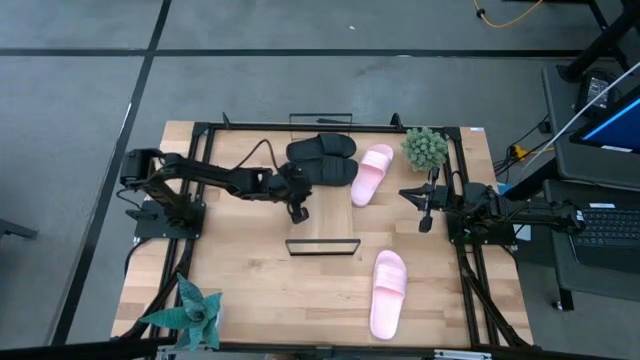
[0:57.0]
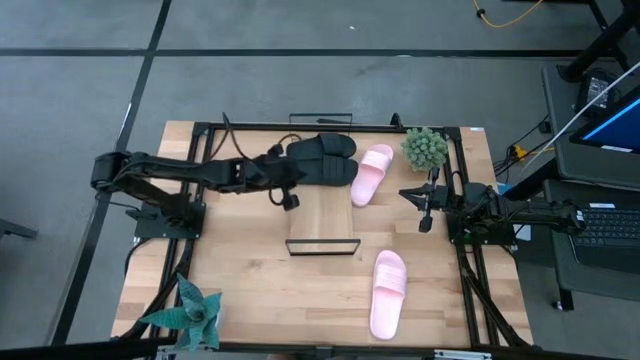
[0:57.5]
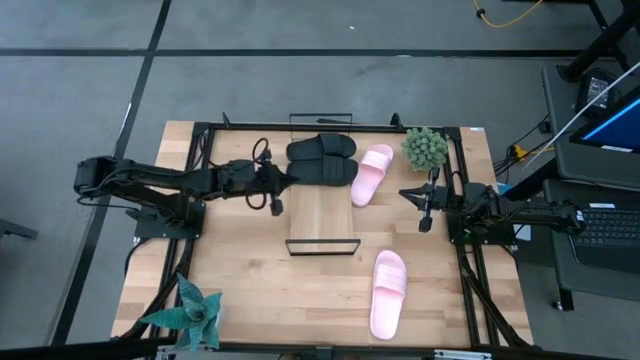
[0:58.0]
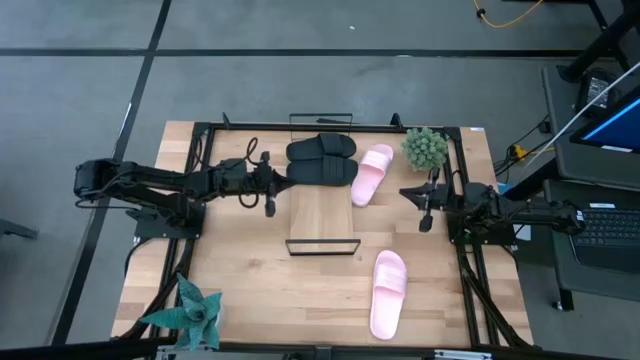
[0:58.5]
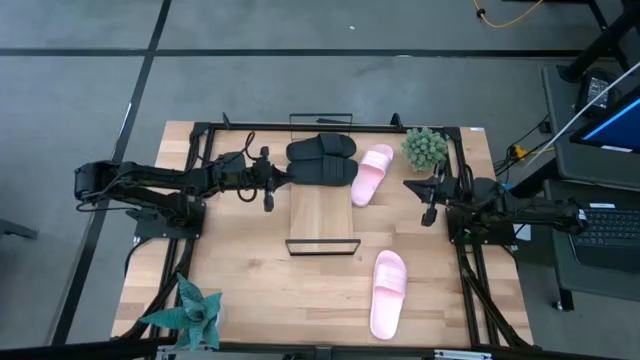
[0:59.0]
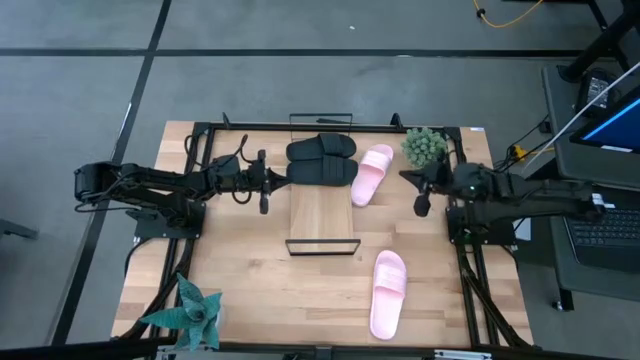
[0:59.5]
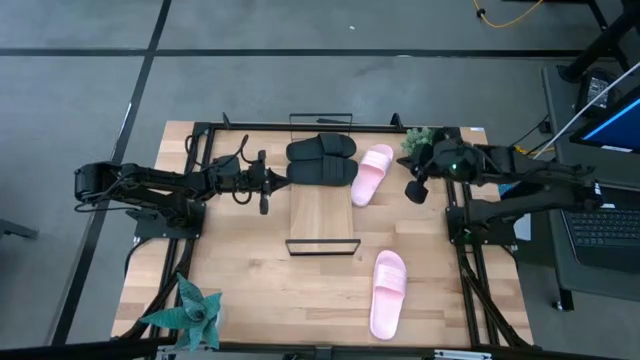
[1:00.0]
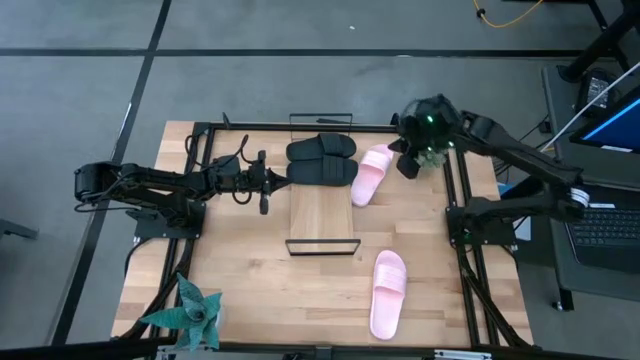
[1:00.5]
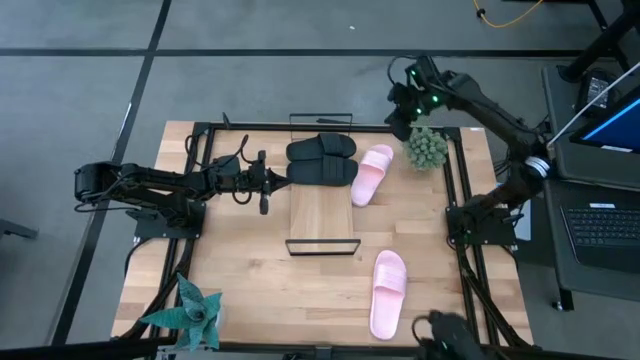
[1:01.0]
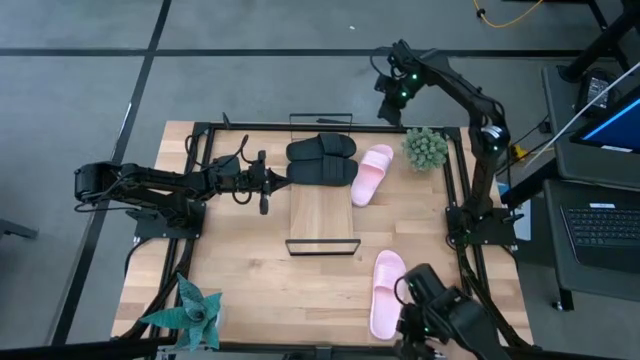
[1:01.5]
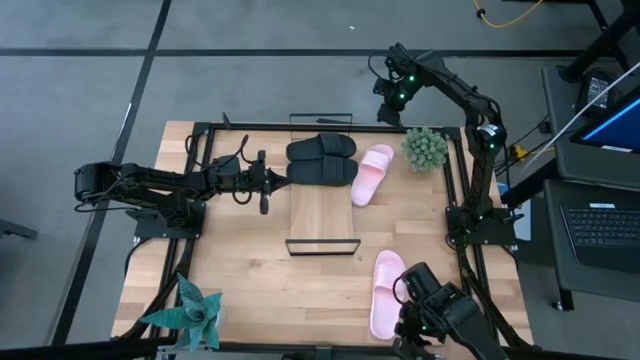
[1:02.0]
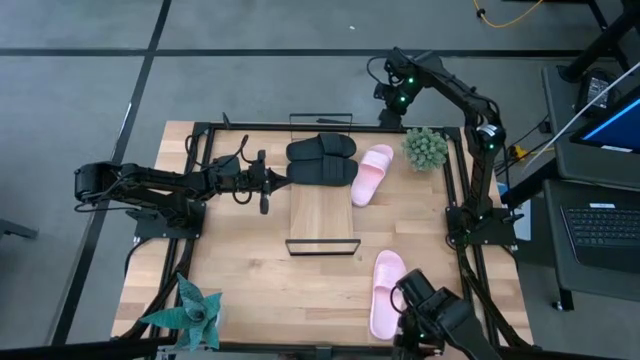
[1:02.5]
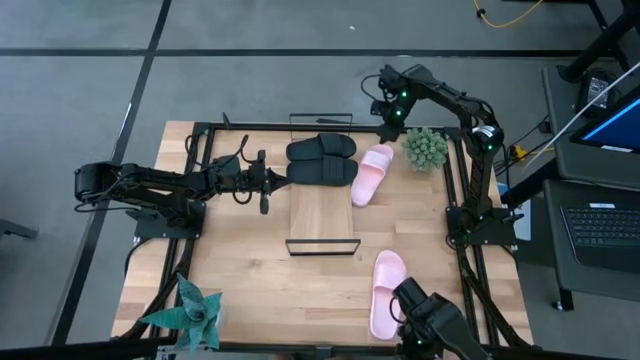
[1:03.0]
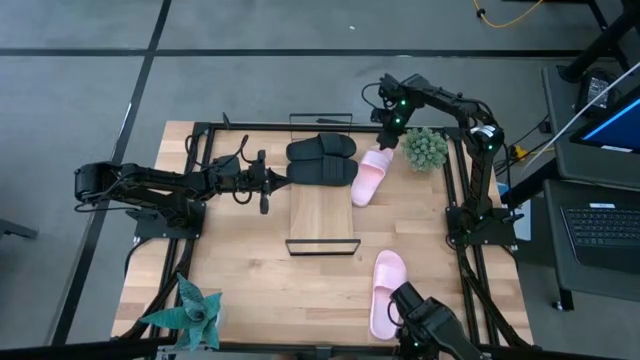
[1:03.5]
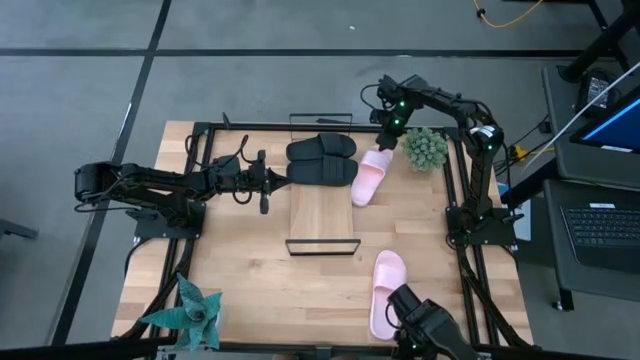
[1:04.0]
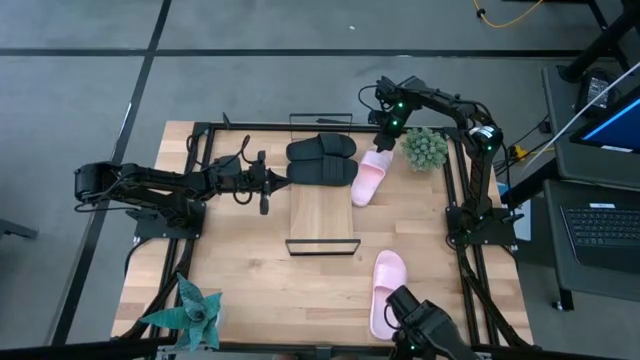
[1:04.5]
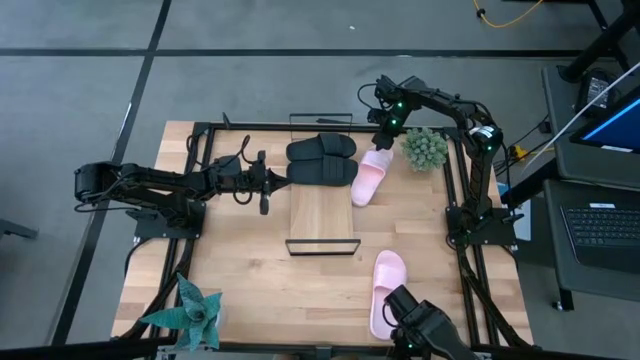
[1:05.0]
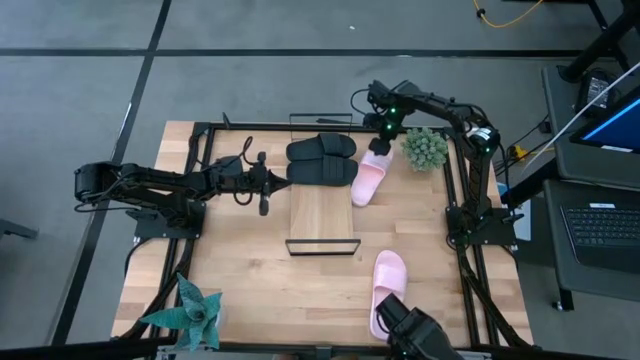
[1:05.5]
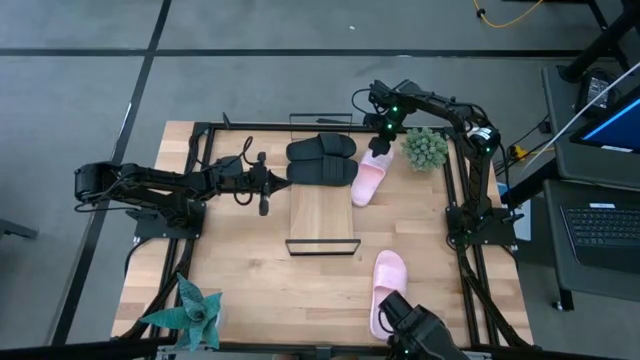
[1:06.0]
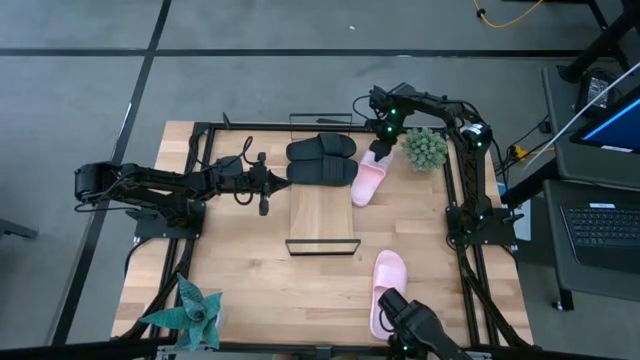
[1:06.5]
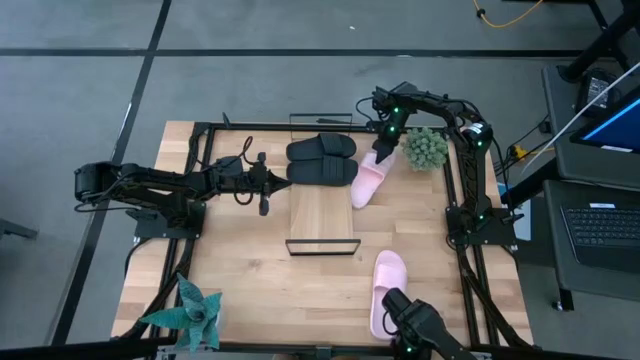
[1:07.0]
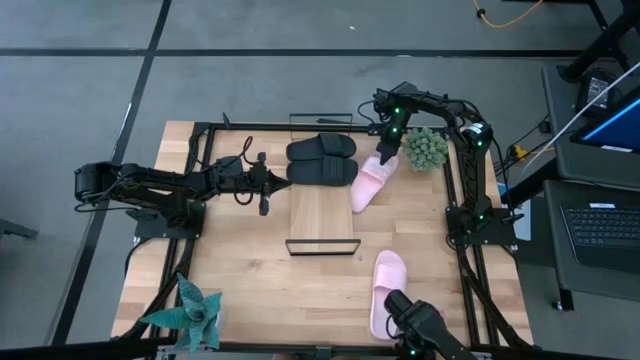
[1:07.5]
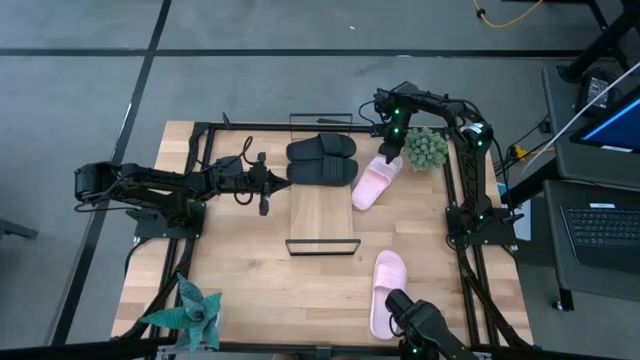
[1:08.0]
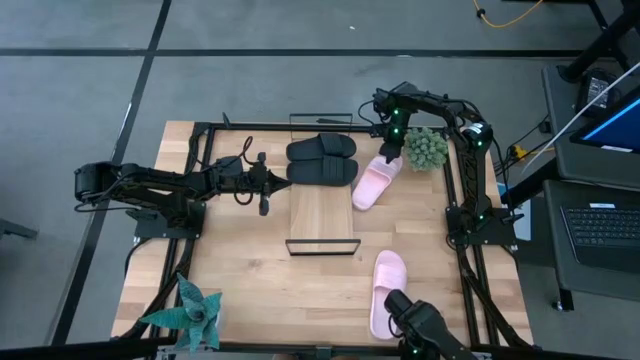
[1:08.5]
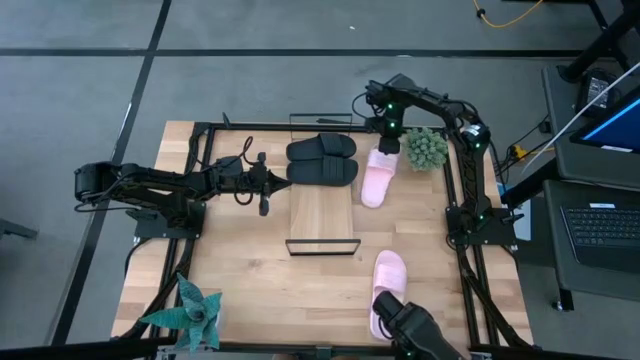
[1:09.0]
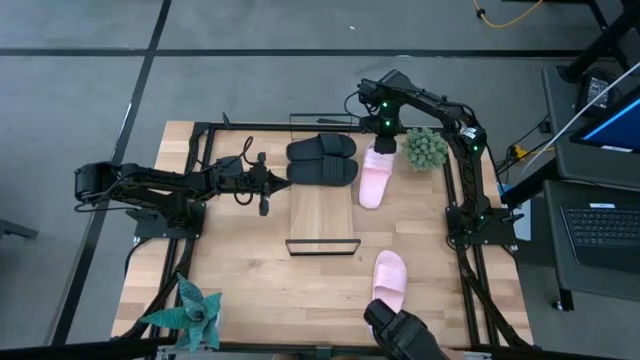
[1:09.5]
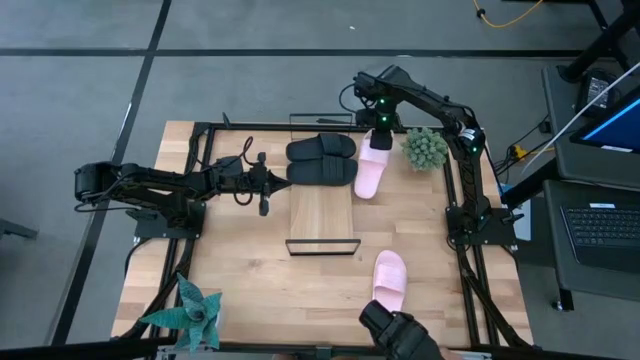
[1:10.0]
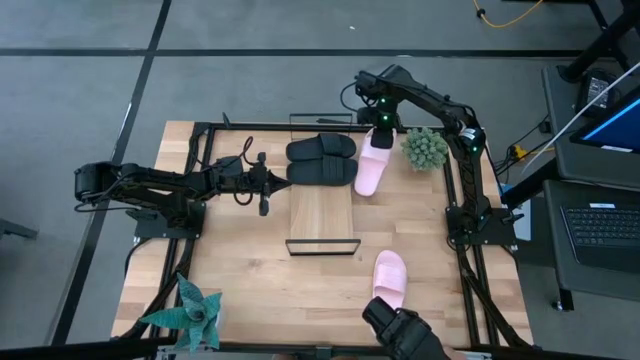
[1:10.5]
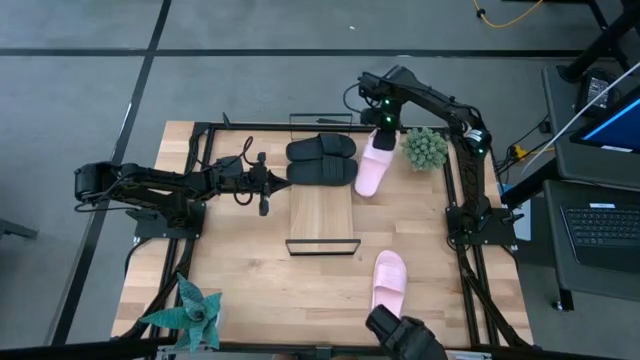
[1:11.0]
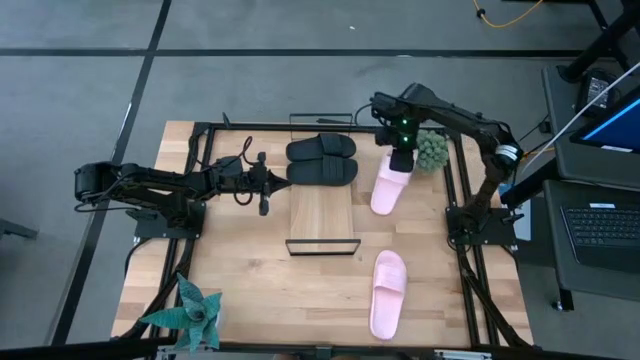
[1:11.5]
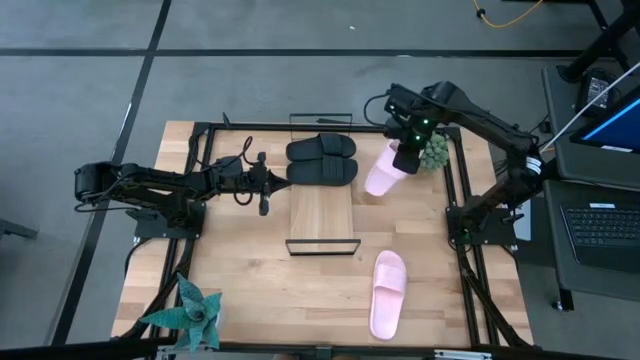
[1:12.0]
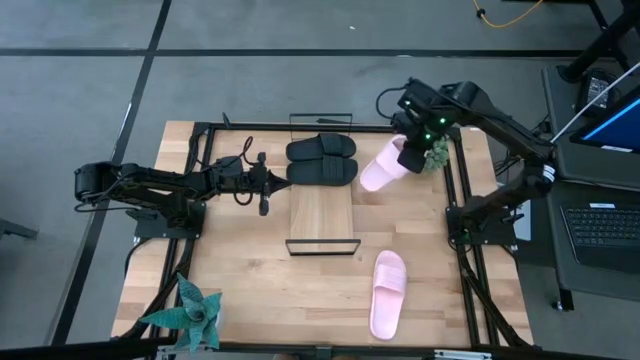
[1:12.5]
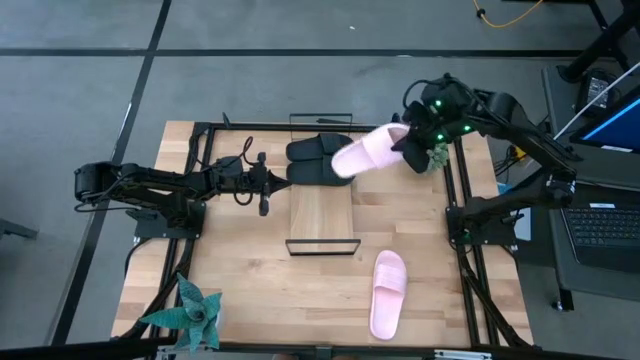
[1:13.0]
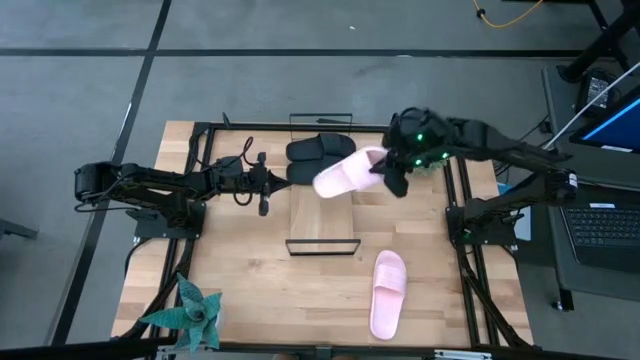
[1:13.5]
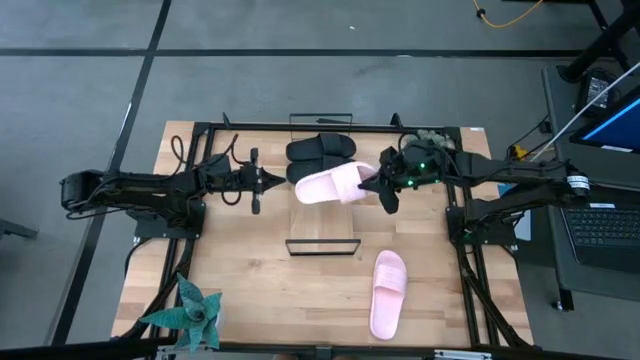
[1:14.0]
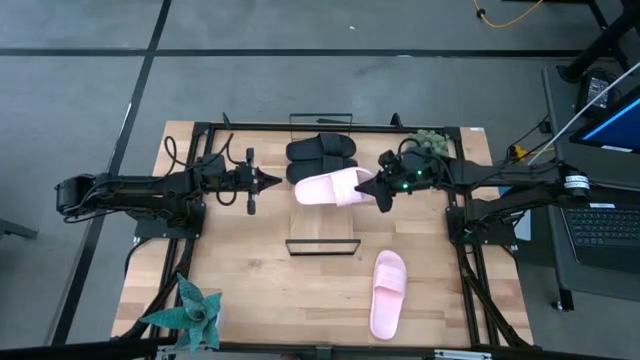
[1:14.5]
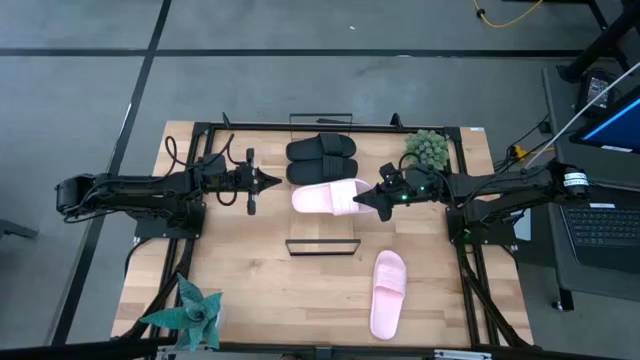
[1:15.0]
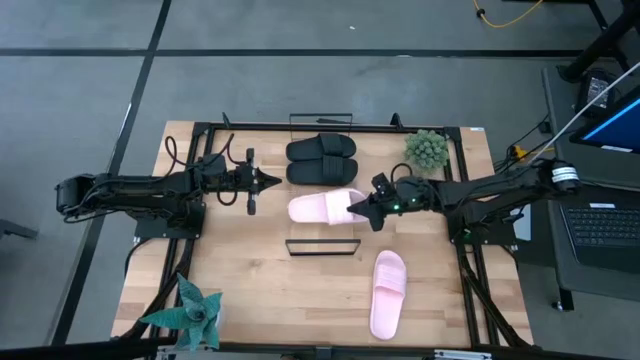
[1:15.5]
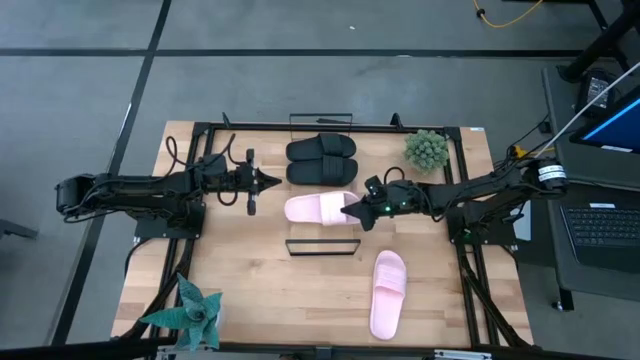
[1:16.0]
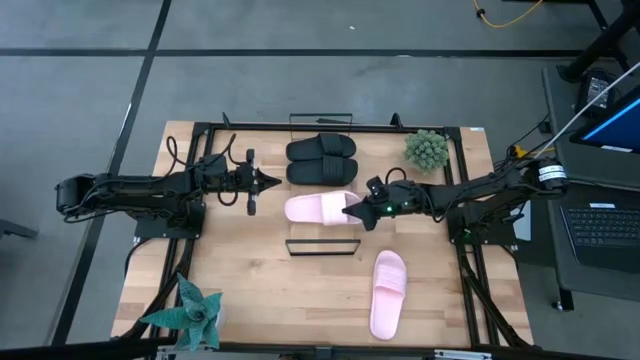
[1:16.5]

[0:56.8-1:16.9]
Task: Pick and place slides into the shelf
Put the top pink slide on the shelf

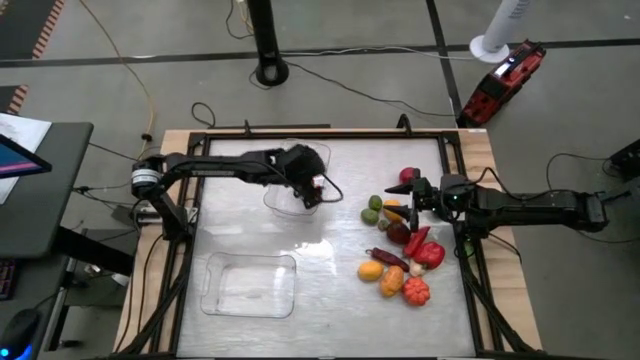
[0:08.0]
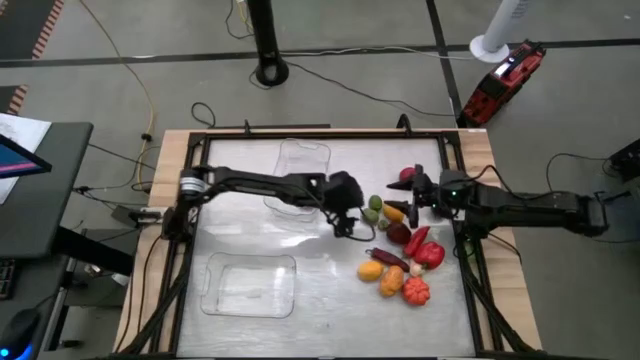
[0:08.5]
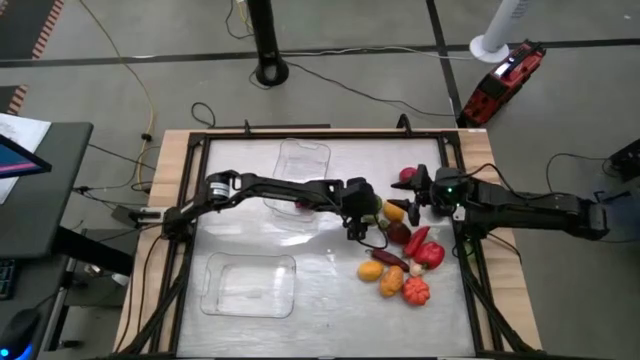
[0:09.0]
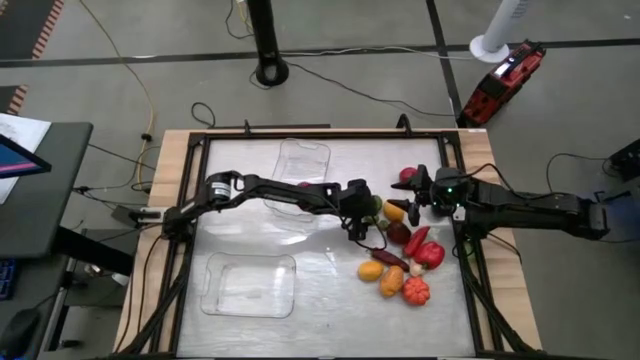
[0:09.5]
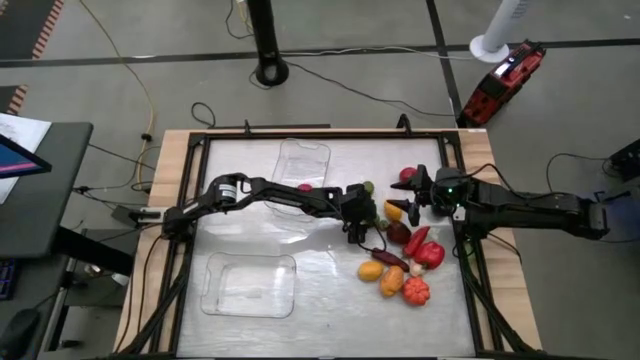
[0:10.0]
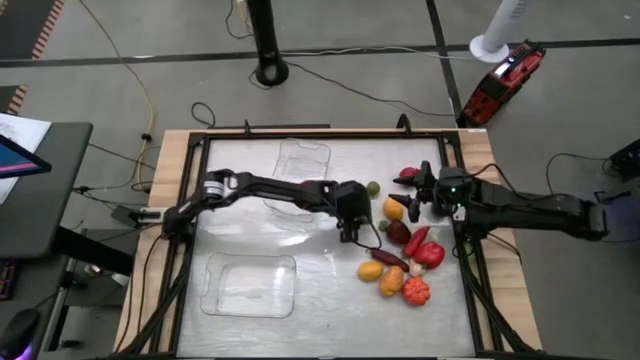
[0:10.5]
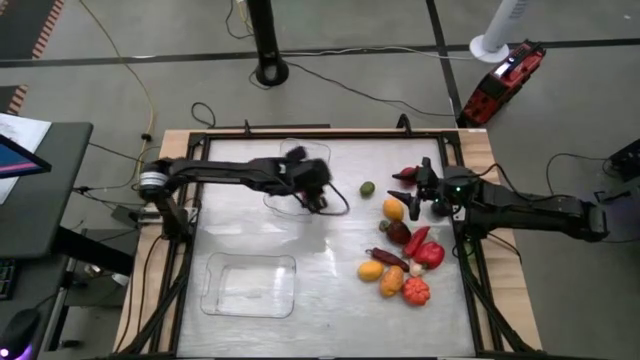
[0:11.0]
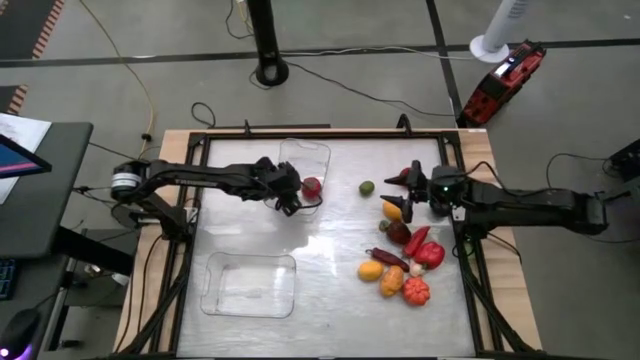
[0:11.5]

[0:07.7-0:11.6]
Task: Sort produce into baskets
Put the bottom lime into the top transparent bin
